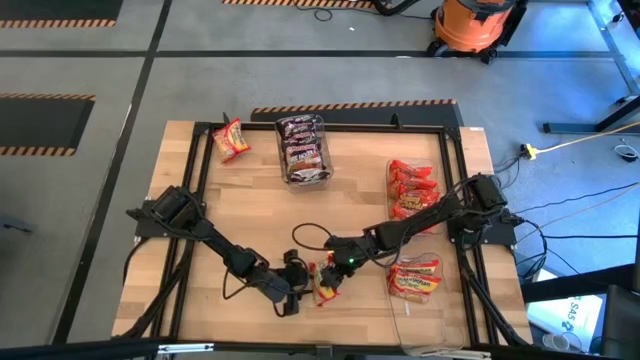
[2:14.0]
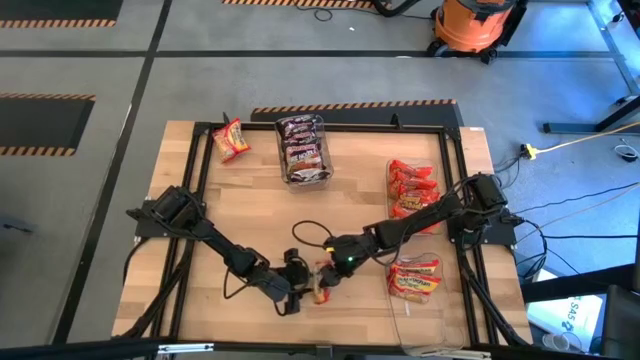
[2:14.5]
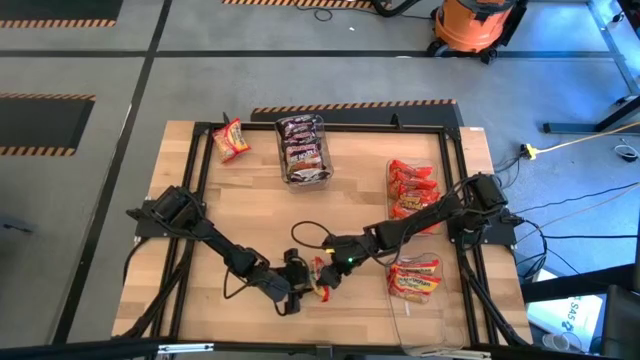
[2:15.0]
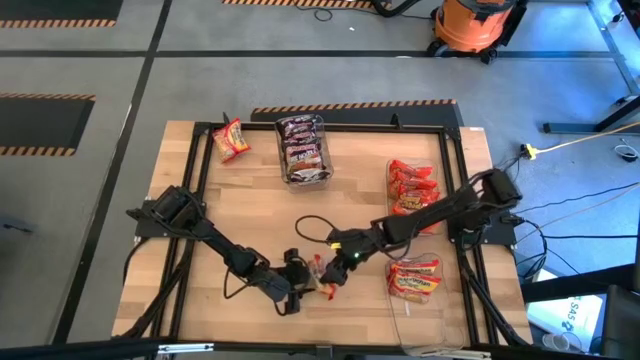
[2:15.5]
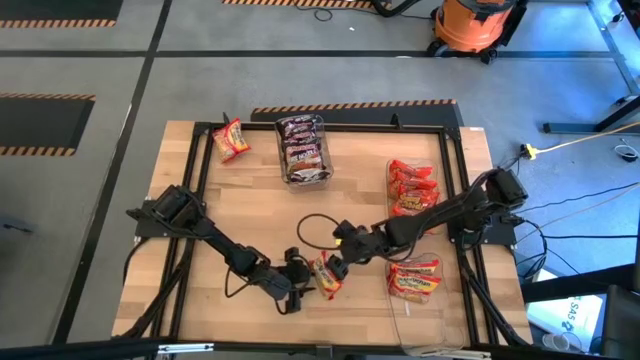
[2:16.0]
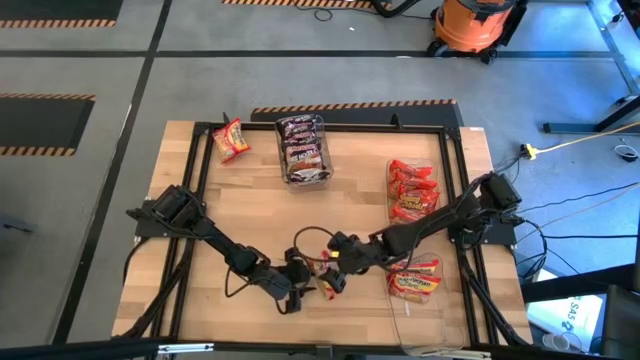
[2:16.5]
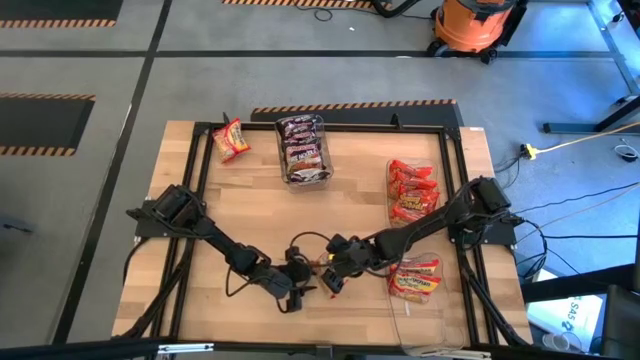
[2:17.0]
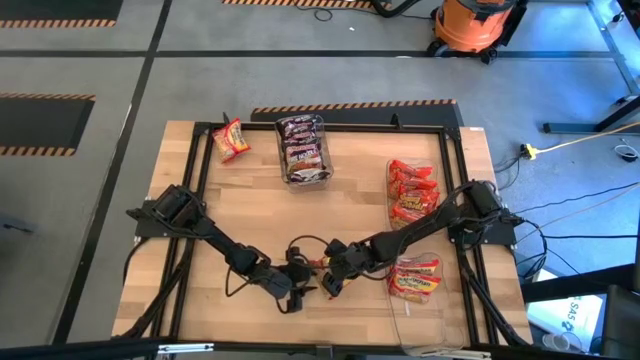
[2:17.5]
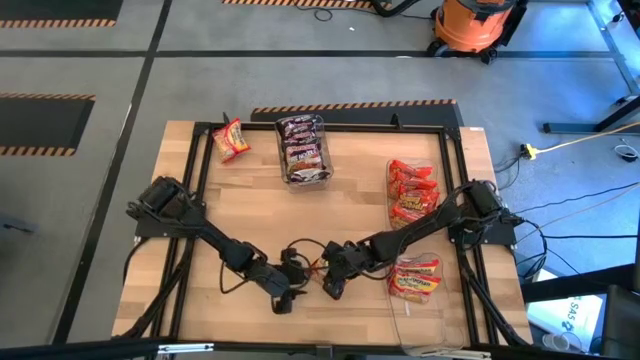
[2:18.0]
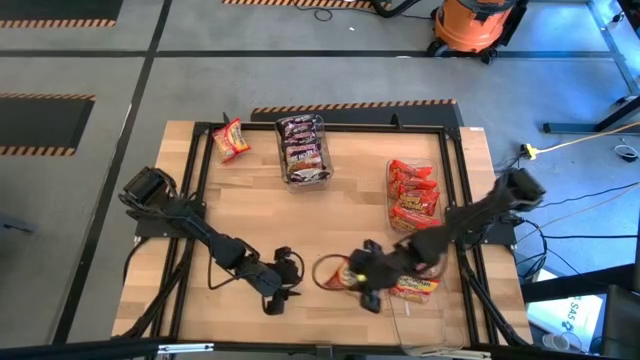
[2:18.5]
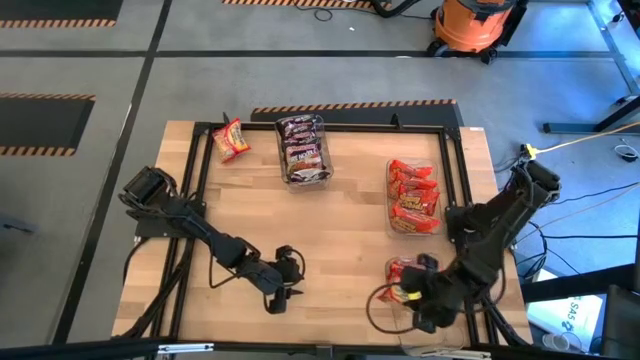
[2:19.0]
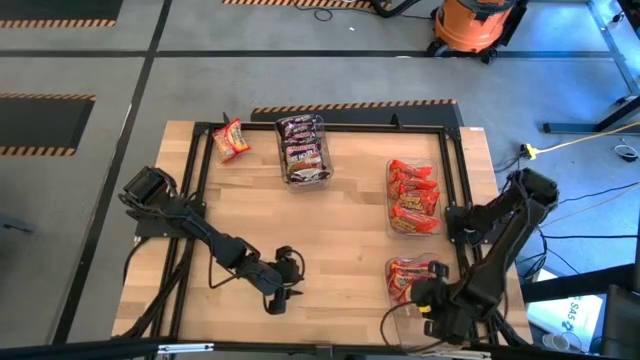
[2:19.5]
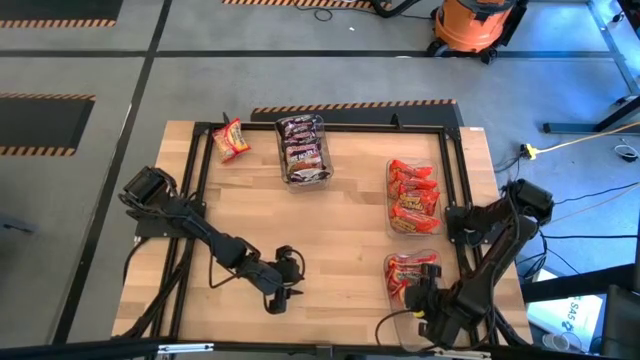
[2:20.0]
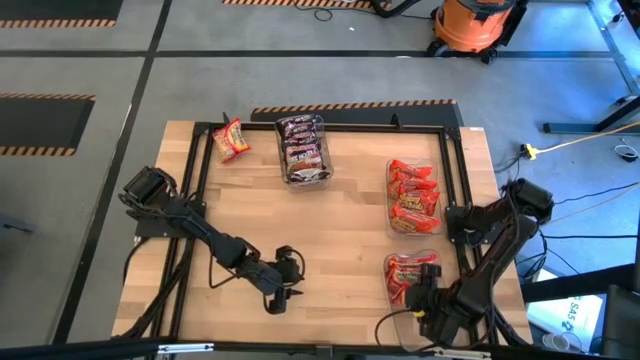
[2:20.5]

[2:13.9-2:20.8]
Task: Sort Maruchan noodles
Put the red noodle pack into the bottom transparent bin

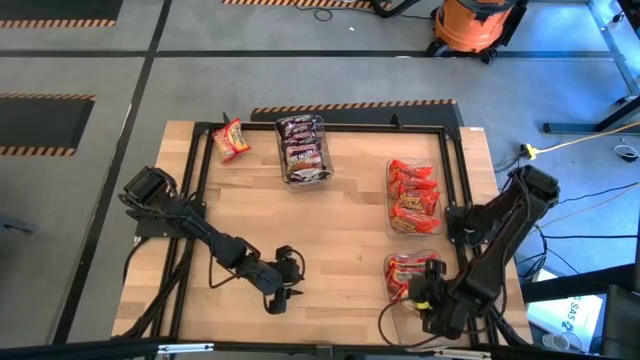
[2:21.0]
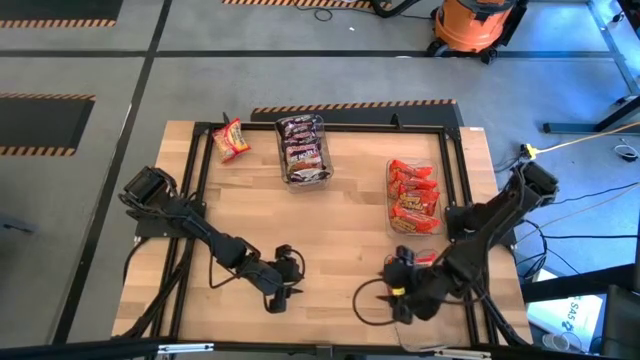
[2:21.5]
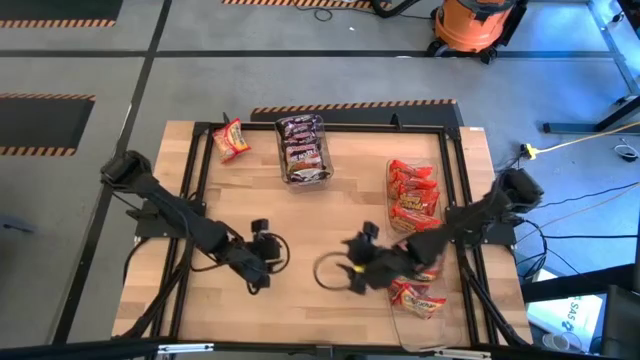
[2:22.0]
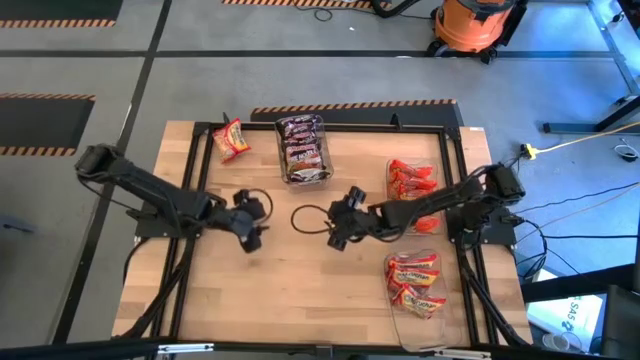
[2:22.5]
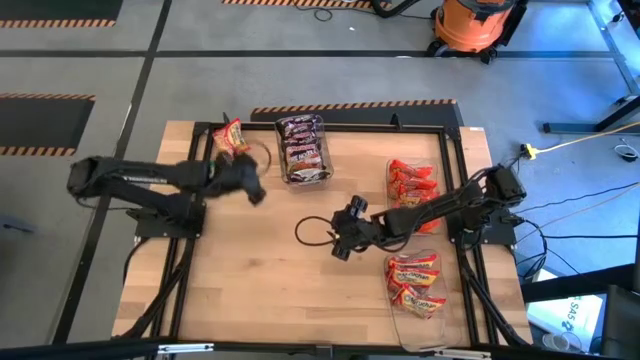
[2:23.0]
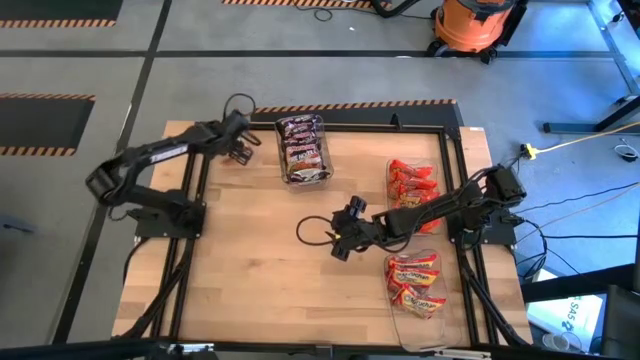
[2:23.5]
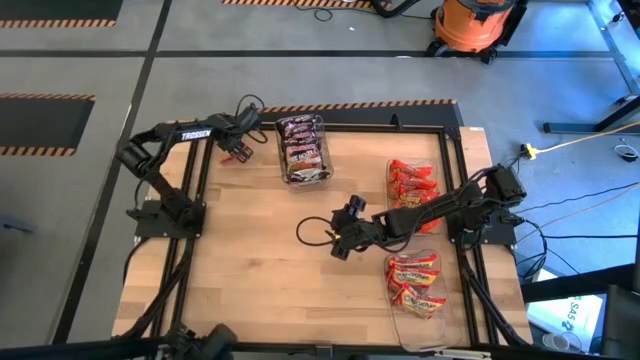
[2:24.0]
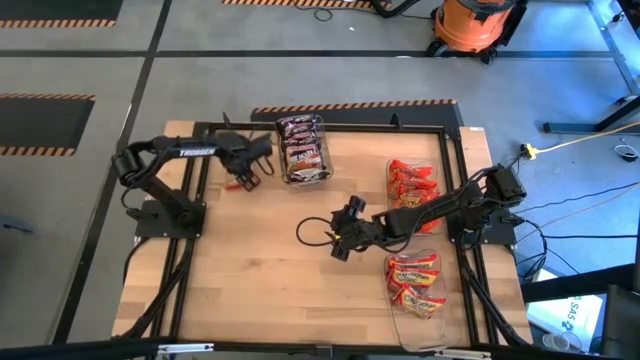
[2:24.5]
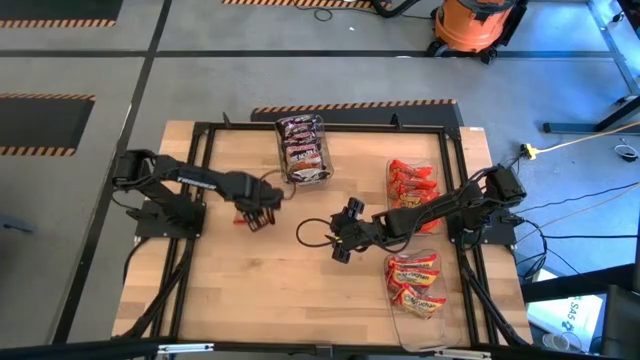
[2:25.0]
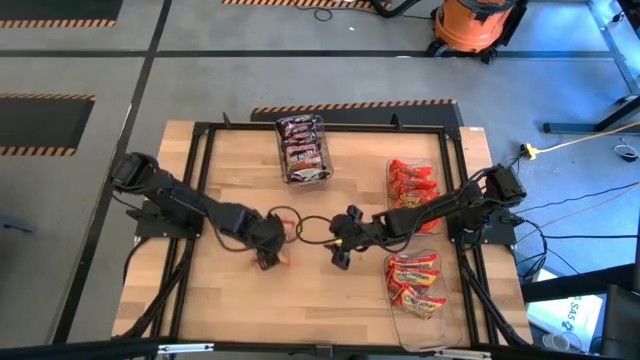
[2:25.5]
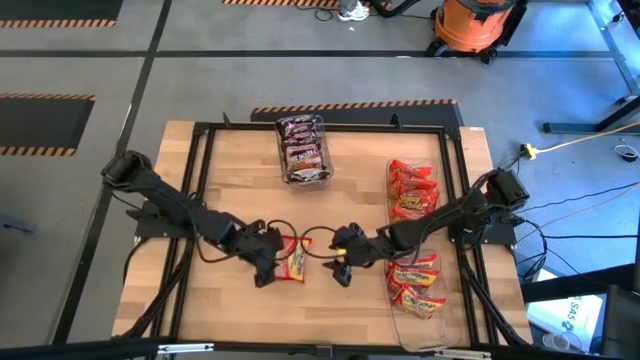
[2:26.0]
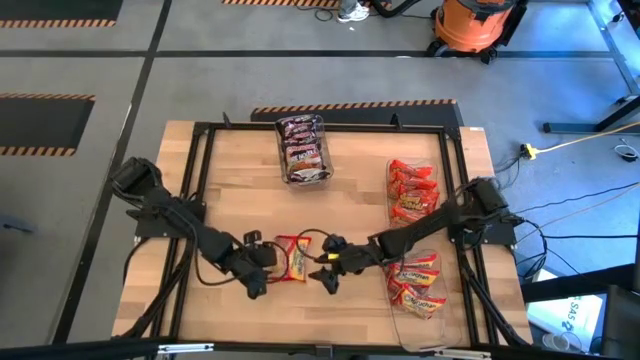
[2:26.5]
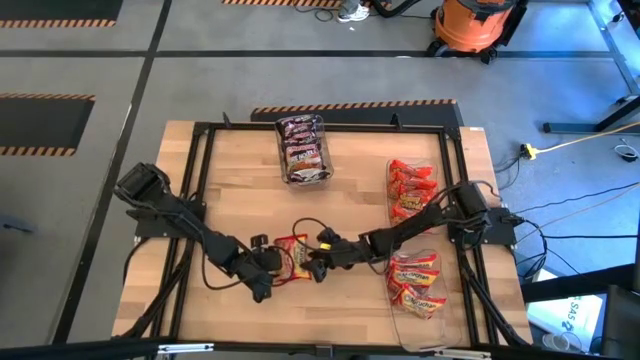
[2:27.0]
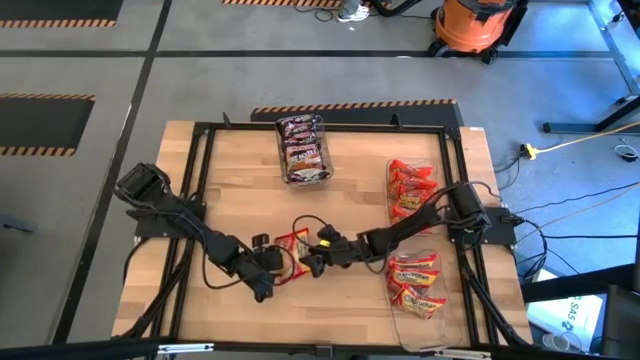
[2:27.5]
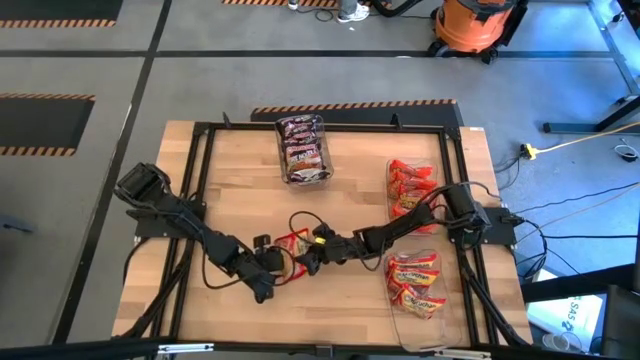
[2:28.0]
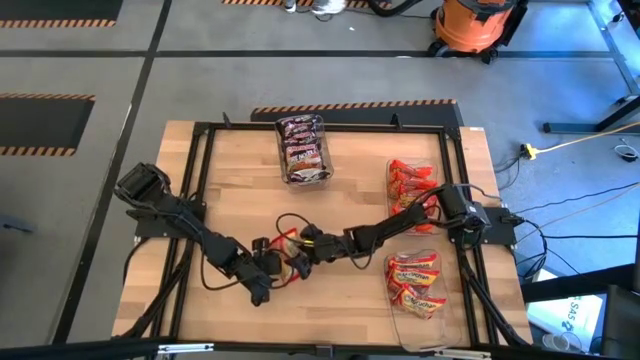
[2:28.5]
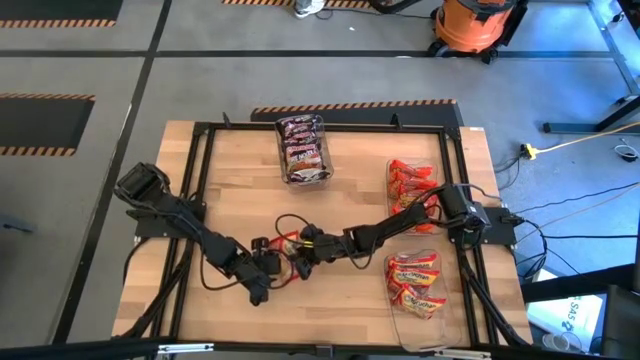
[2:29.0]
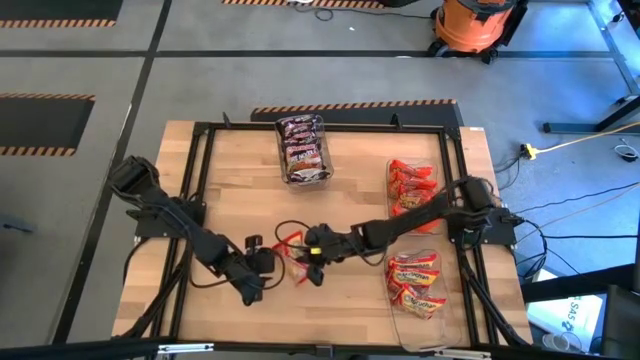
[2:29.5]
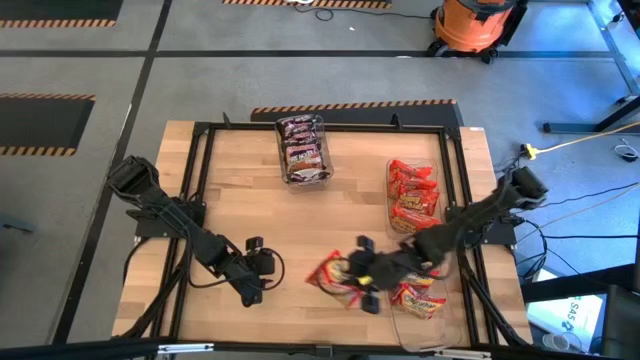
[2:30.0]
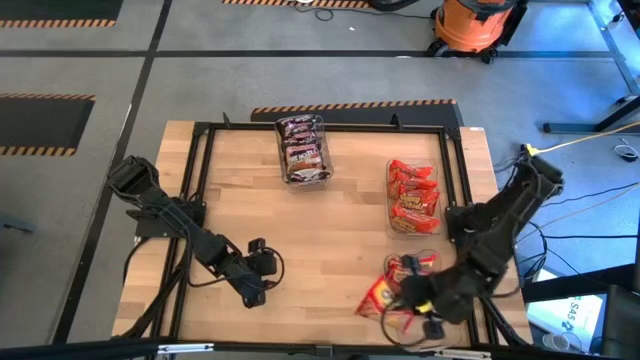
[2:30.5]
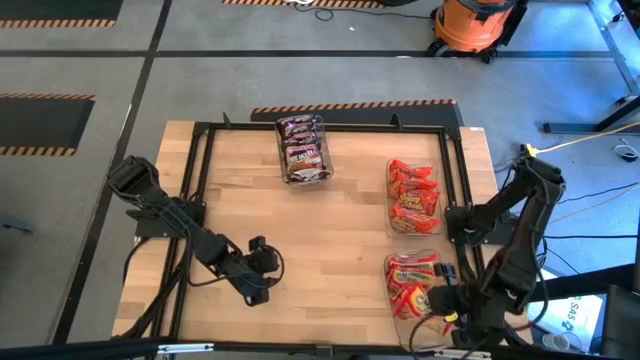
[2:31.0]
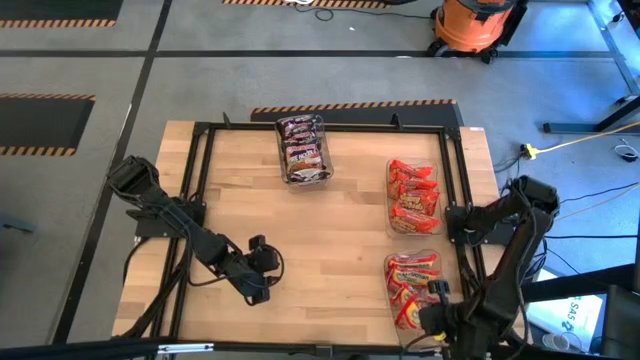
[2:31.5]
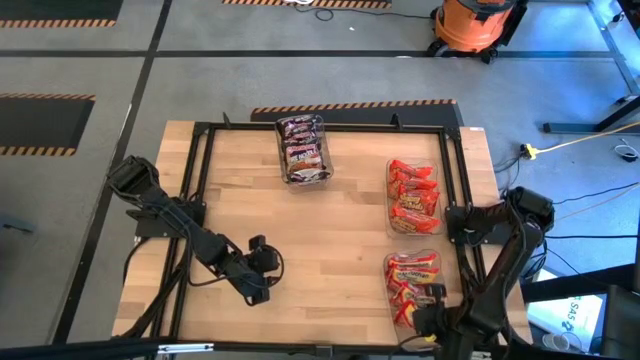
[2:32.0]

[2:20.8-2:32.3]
Put the red noodle pack into the bottom transparent bin

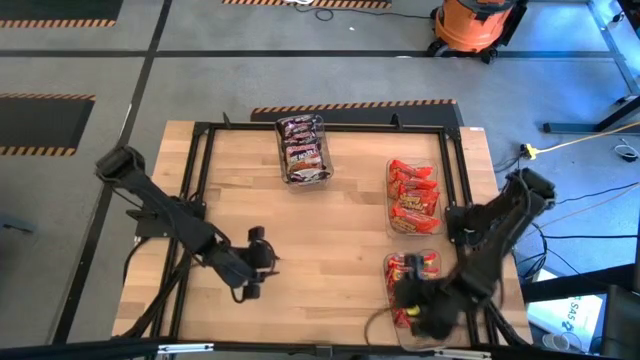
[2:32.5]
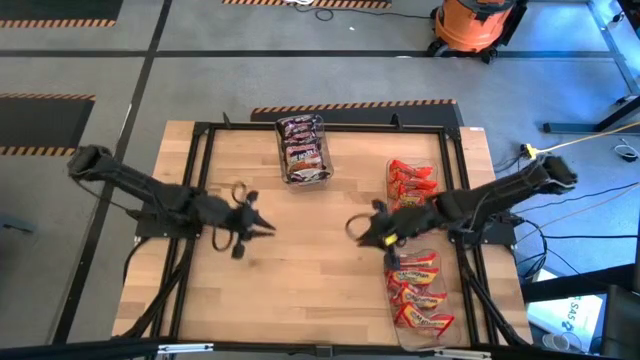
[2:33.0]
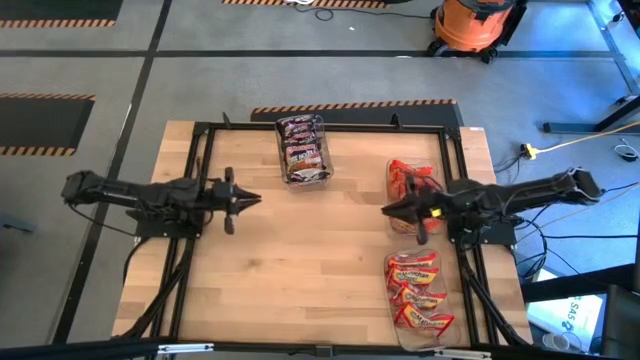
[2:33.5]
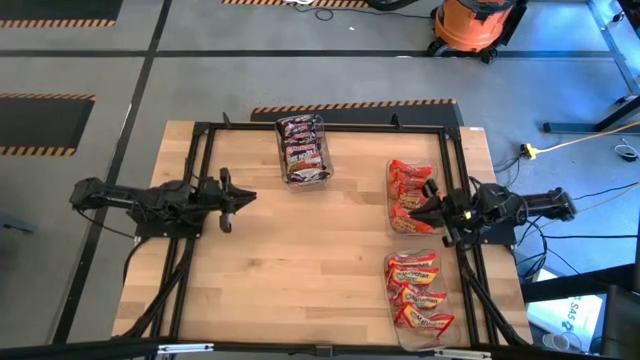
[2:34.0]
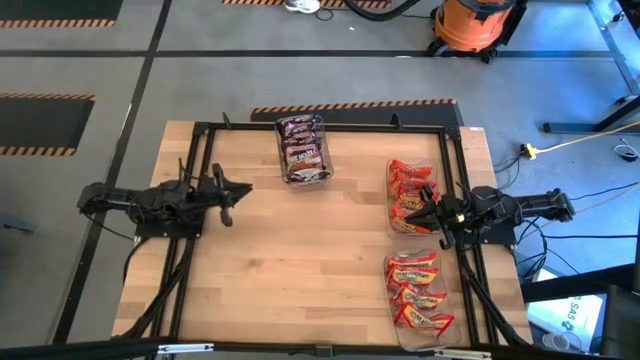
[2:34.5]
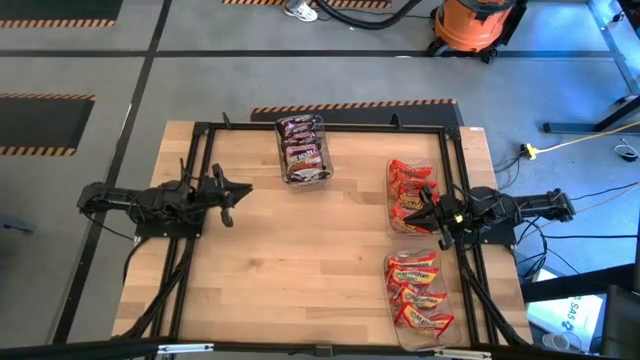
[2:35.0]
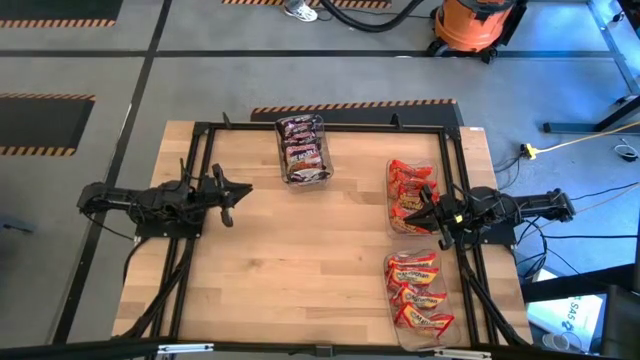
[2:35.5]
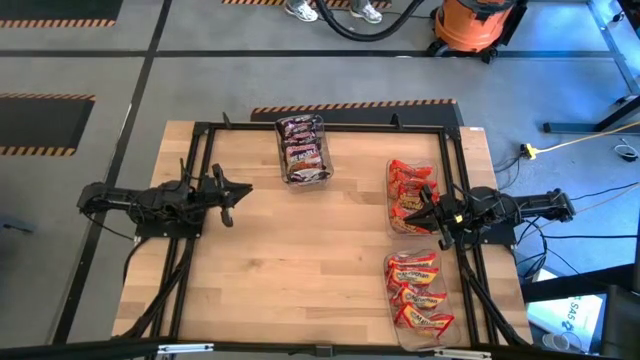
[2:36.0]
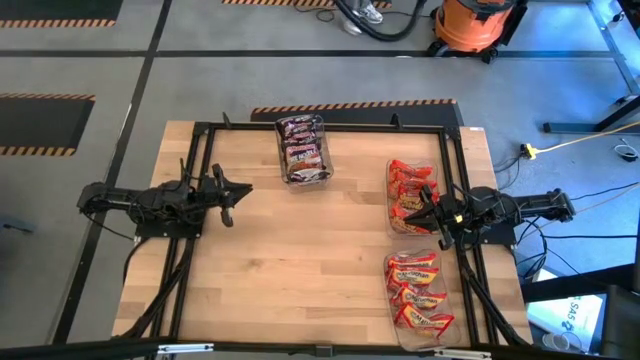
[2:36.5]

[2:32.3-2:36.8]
Return to Home Position
